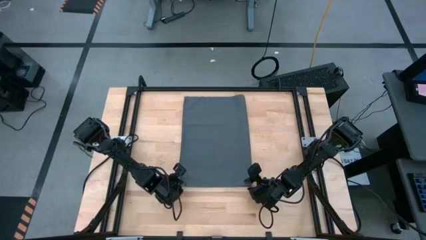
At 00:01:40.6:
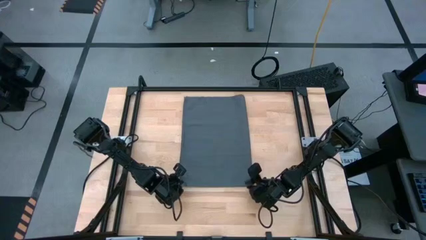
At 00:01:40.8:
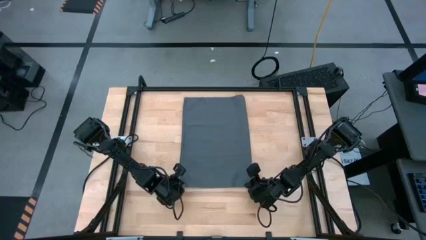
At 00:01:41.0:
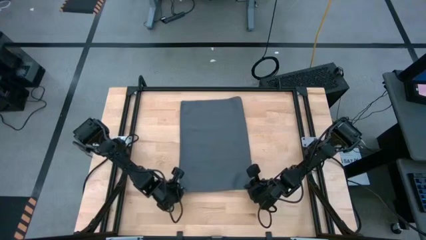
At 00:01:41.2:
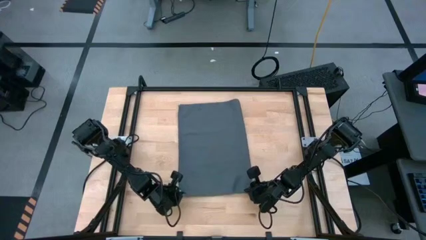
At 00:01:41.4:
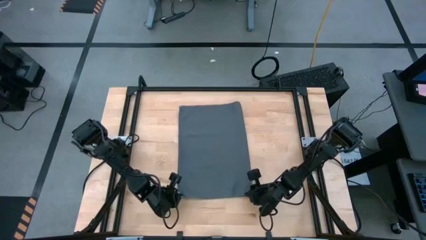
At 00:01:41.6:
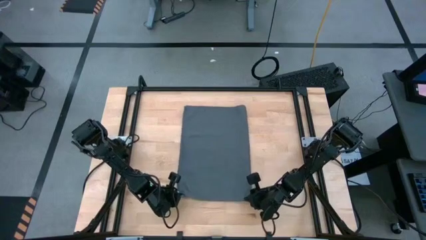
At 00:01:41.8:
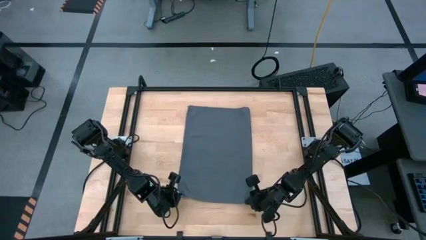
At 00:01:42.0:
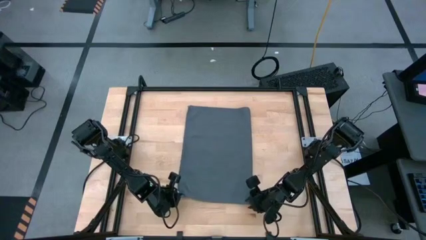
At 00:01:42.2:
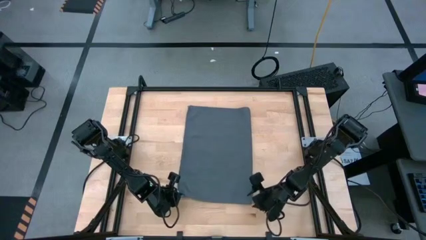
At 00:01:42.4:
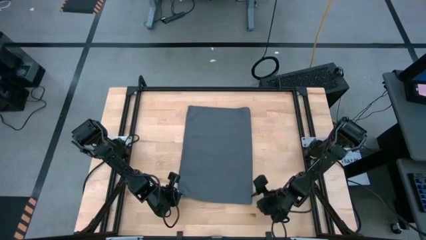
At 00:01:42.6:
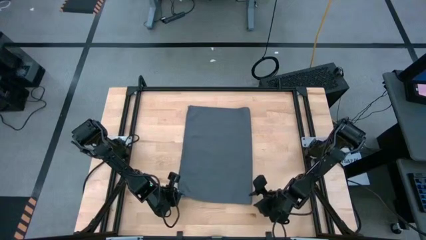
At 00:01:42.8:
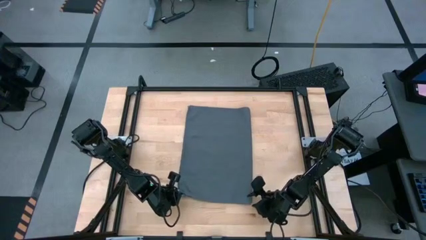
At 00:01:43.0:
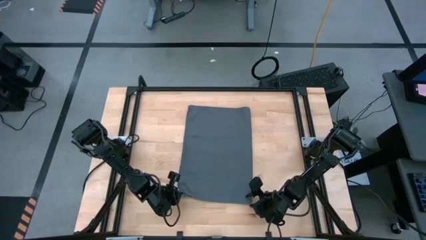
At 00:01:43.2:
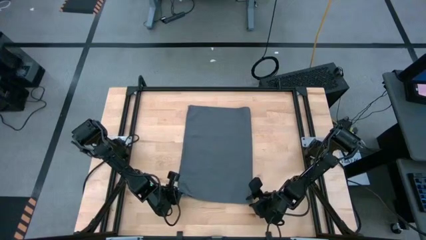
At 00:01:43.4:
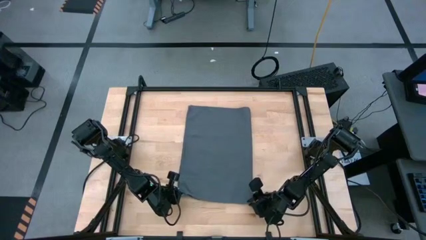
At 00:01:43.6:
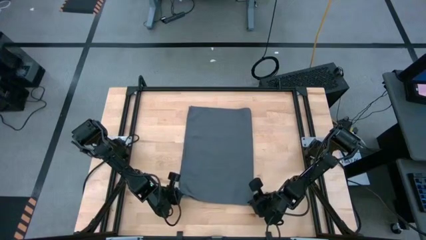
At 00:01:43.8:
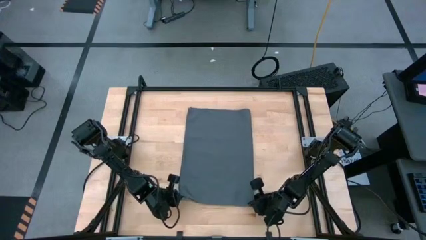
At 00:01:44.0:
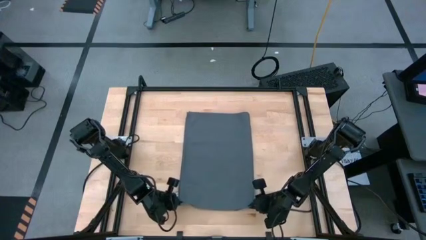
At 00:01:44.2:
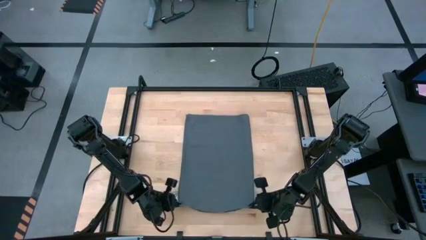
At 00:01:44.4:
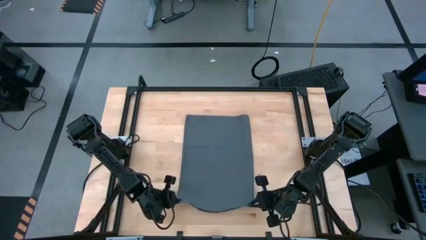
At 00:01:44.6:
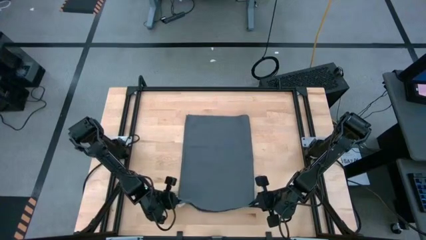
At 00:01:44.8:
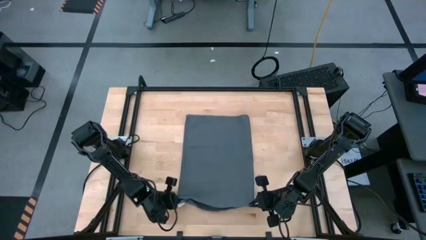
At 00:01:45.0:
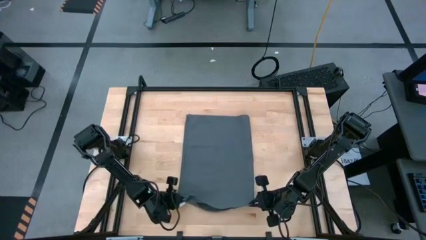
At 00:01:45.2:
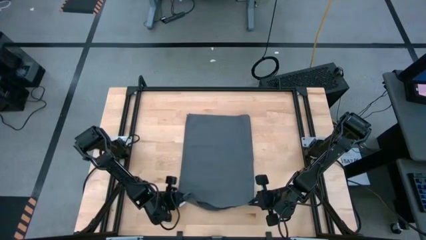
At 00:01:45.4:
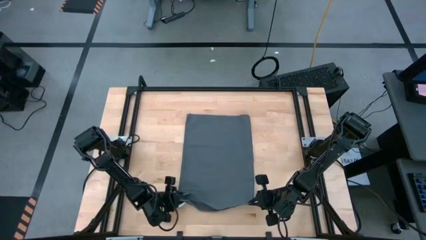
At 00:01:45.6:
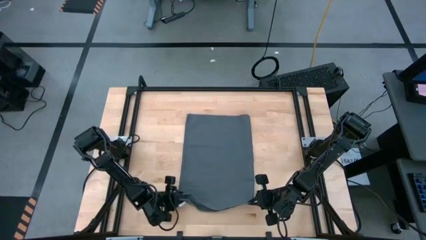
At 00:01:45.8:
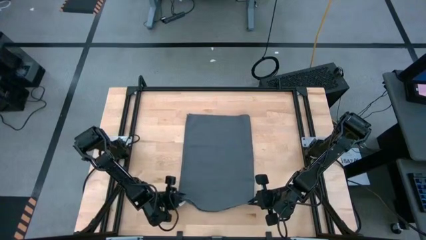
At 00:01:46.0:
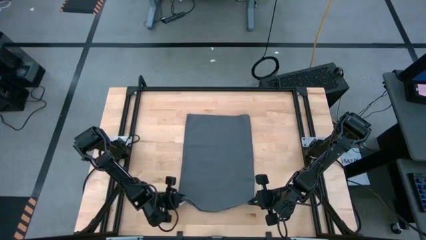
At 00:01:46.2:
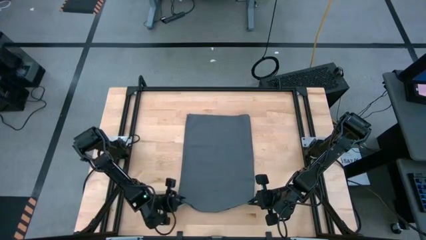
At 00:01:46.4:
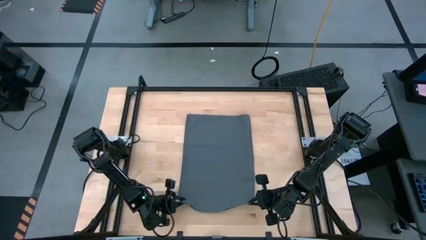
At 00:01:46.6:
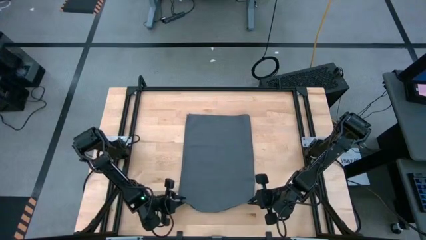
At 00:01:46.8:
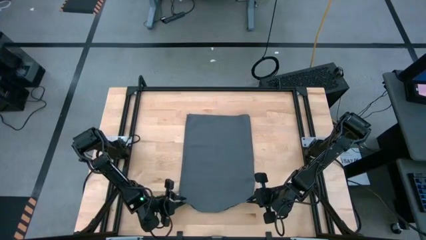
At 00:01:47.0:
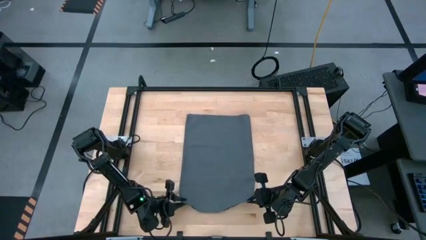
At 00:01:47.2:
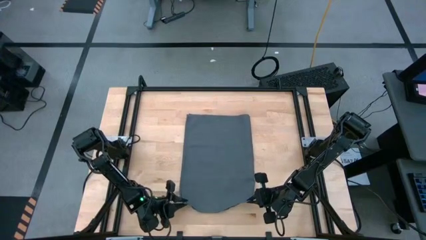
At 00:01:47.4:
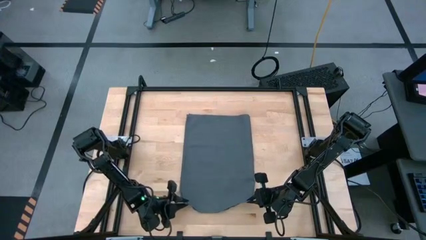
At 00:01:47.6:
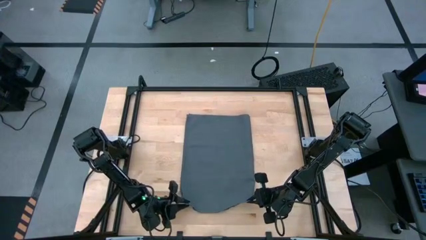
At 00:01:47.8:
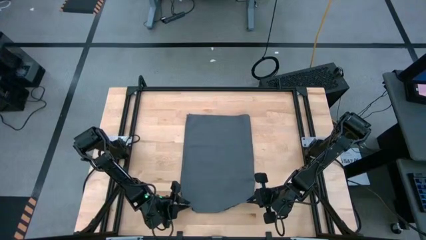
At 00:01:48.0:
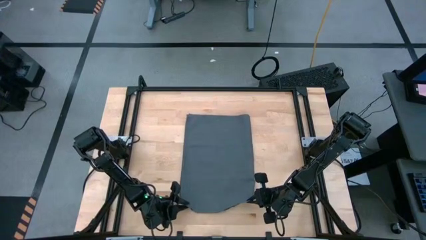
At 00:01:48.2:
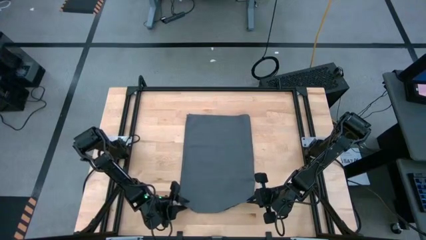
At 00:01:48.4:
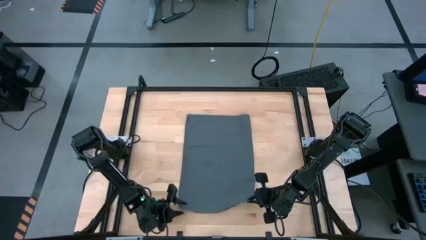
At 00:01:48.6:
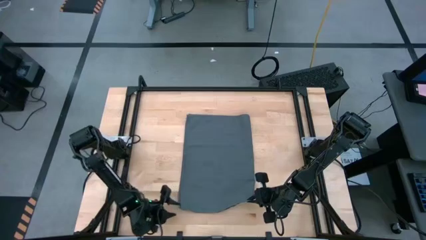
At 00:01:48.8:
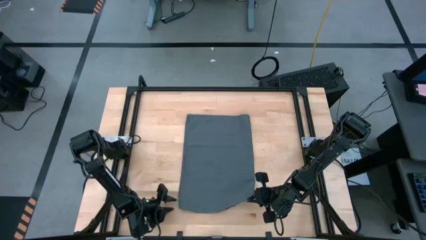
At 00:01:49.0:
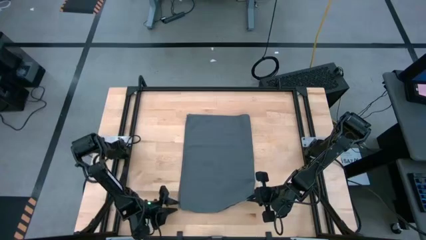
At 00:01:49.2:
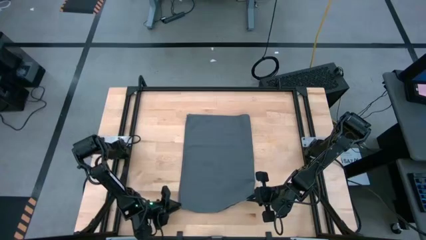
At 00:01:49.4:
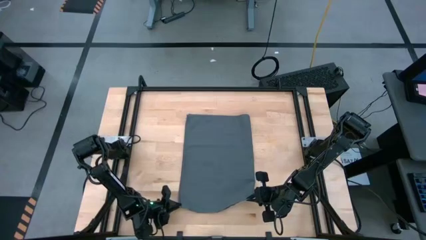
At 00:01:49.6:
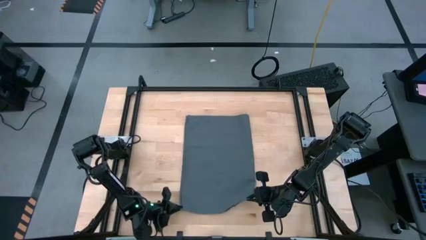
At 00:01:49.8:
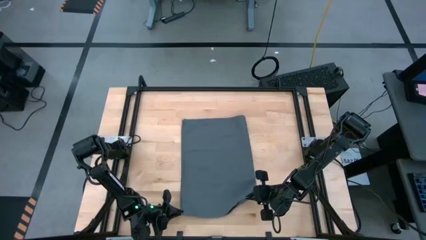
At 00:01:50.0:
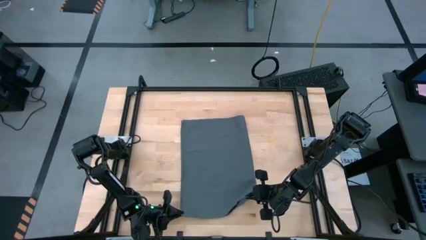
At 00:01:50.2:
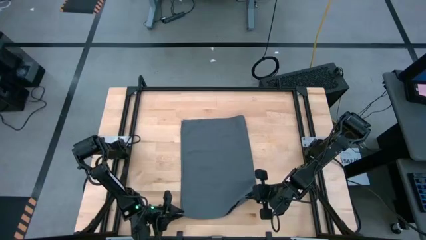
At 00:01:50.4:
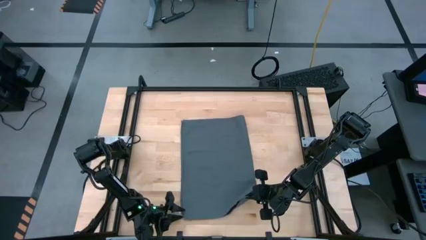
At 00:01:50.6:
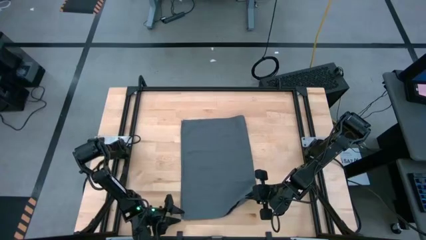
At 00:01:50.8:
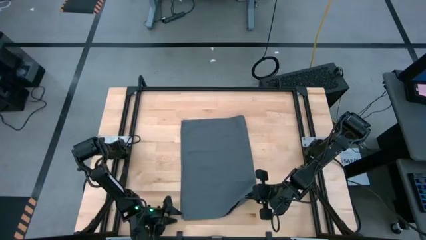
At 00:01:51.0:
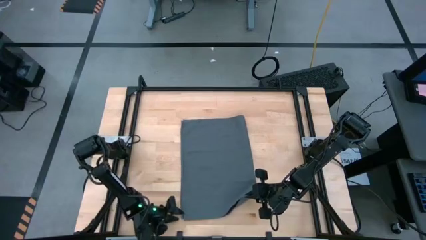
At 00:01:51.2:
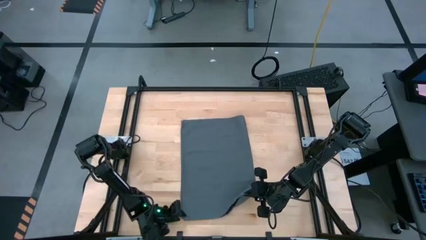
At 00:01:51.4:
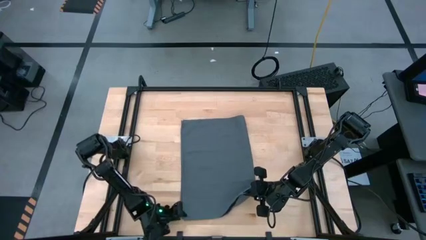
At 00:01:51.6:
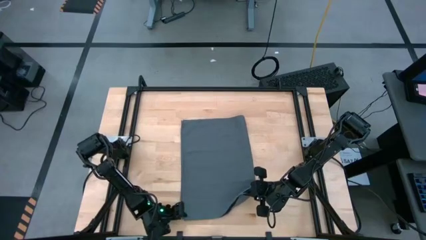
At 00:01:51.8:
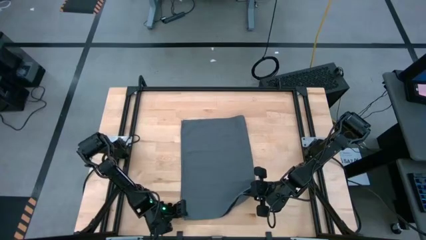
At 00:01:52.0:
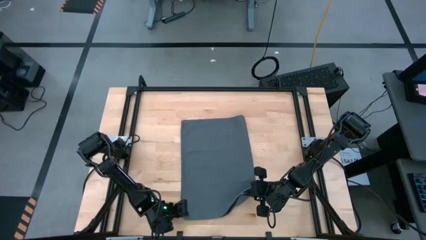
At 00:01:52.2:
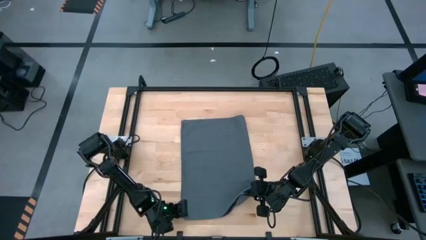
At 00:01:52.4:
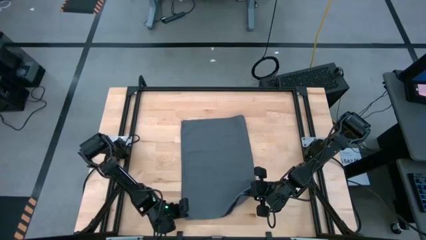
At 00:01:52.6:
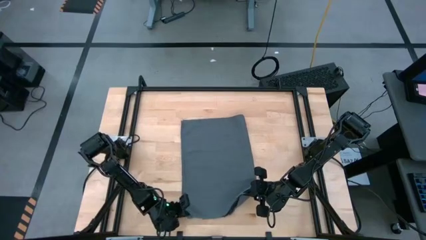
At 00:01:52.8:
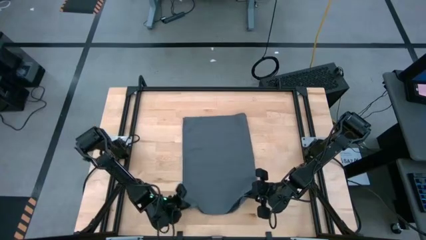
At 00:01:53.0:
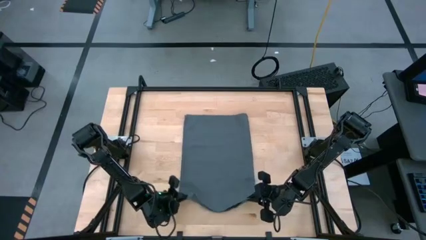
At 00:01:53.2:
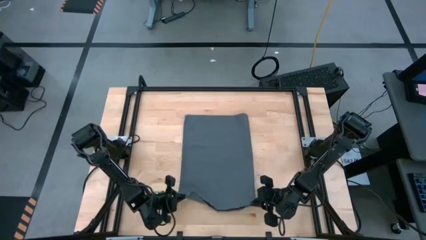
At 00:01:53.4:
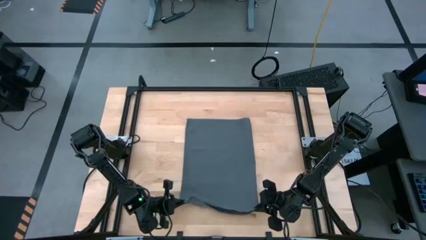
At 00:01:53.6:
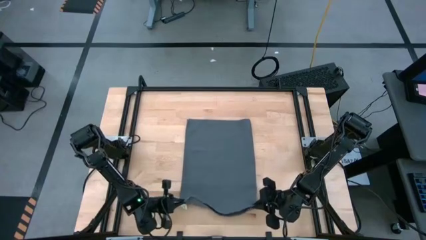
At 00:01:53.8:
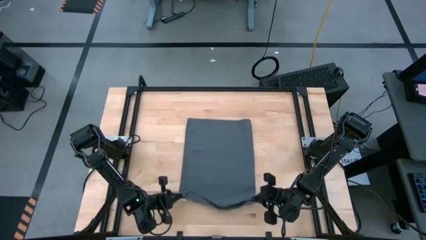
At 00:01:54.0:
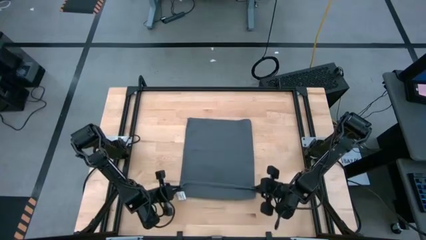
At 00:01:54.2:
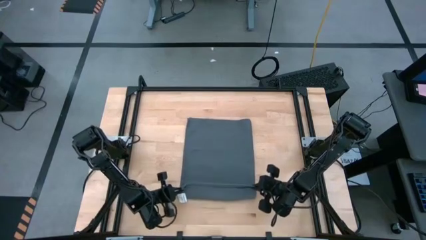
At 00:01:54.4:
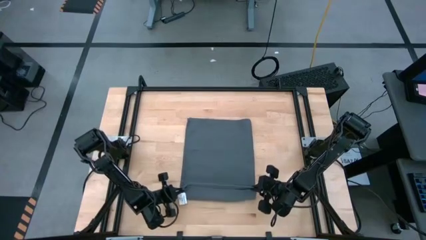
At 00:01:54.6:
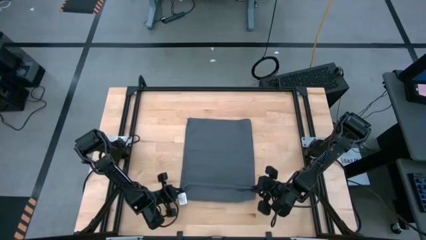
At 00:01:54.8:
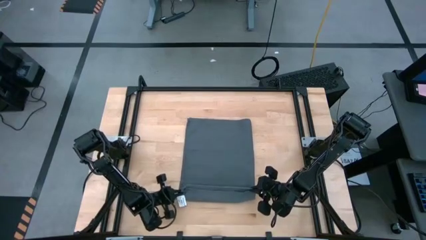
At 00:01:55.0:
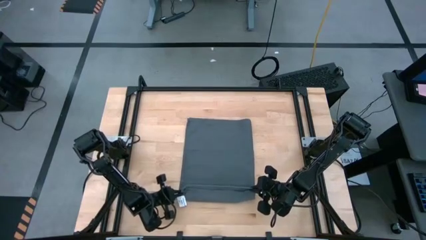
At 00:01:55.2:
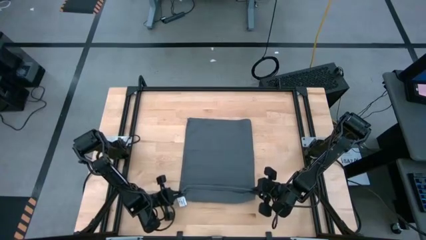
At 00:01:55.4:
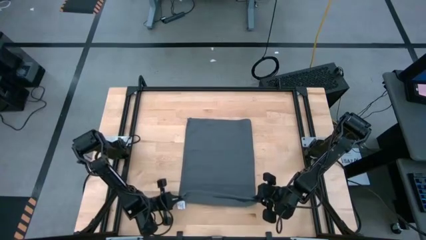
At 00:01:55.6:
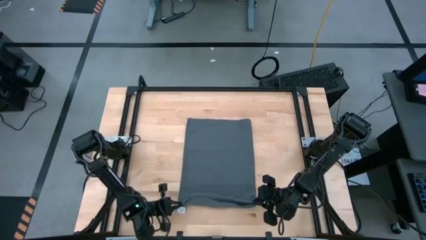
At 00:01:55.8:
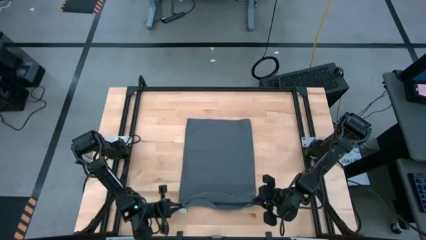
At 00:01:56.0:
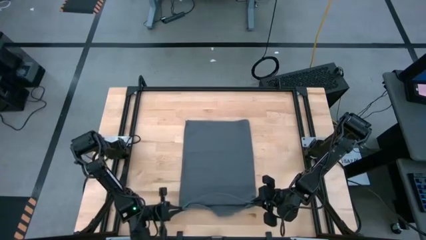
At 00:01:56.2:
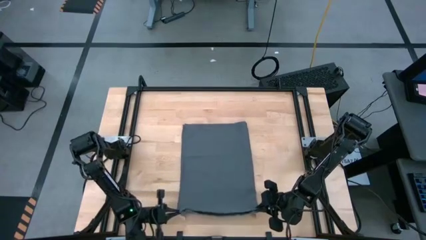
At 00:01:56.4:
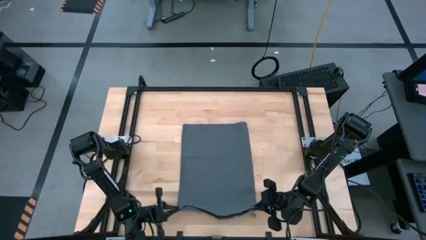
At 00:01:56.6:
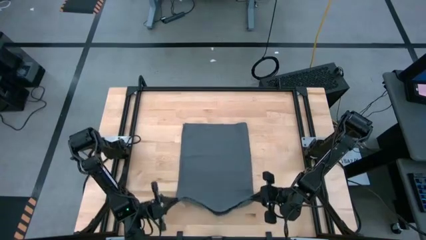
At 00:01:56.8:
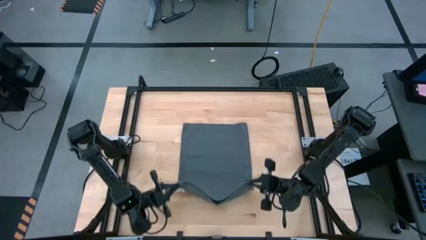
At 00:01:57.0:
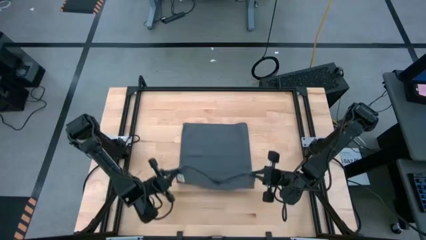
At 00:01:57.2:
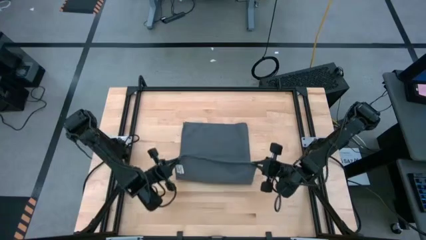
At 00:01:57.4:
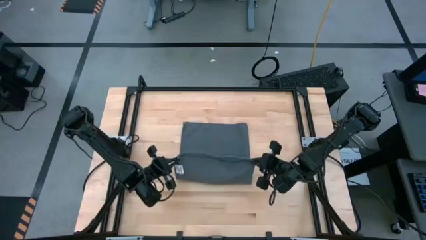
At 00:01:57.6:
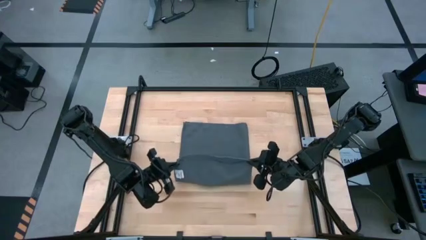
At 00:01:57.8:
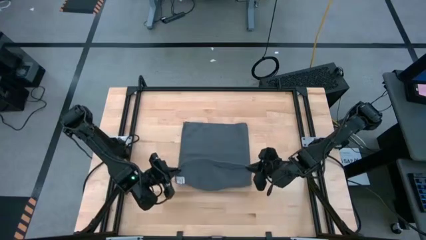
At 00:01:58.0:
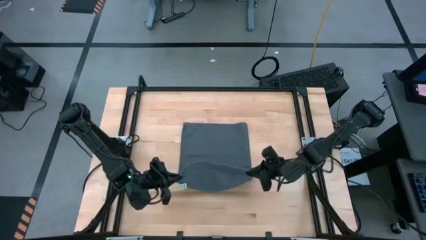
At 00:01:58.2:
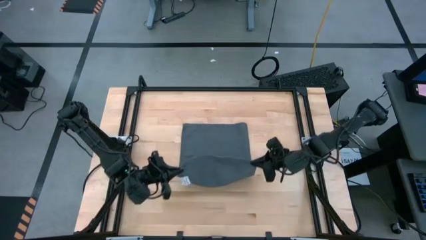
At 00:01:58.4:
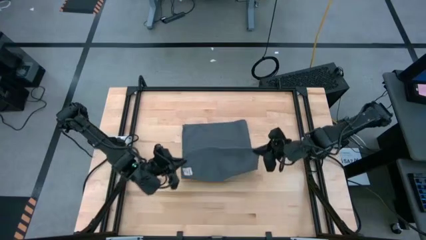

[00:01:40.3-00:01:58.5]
Task: Roll towel
Fold the gray towel on the center of table
